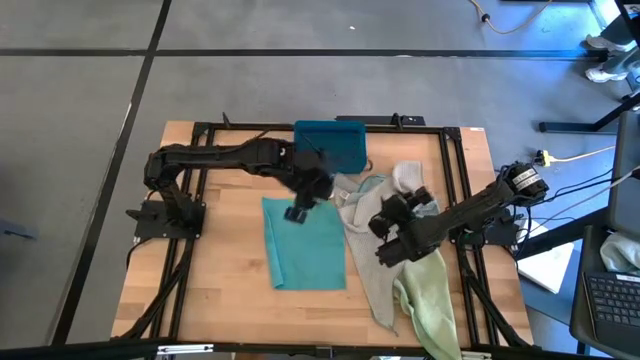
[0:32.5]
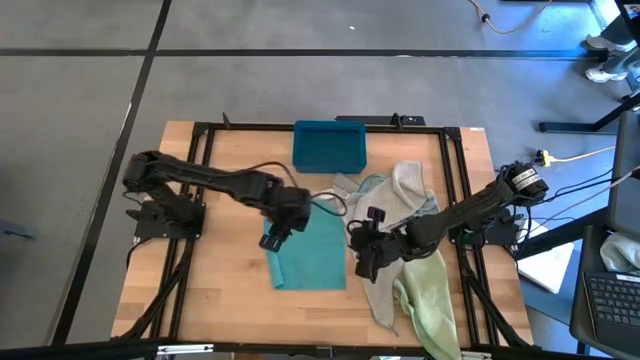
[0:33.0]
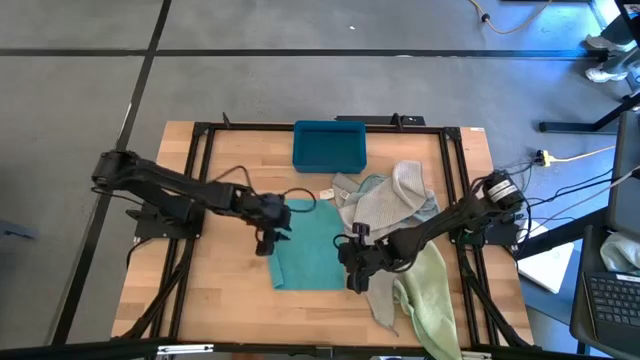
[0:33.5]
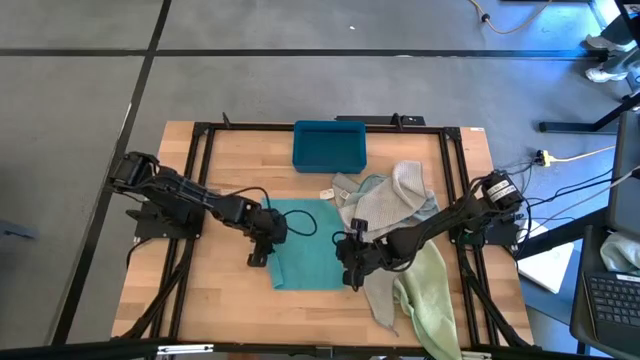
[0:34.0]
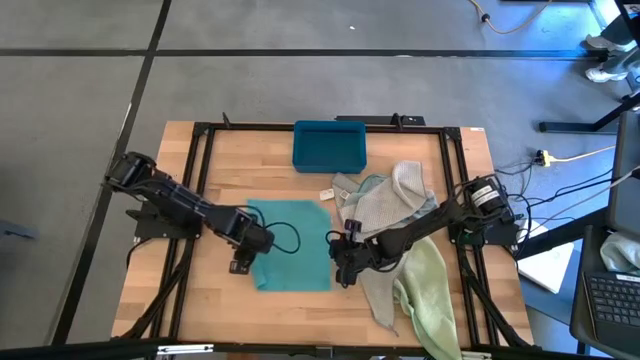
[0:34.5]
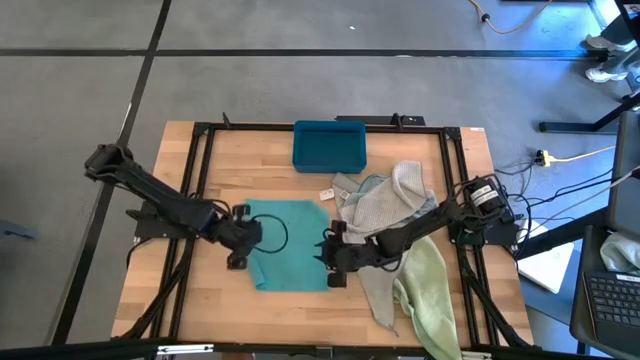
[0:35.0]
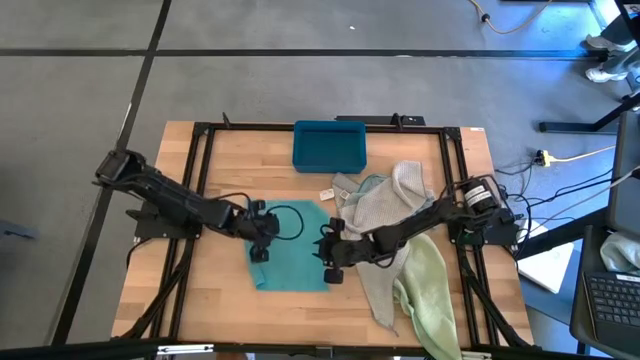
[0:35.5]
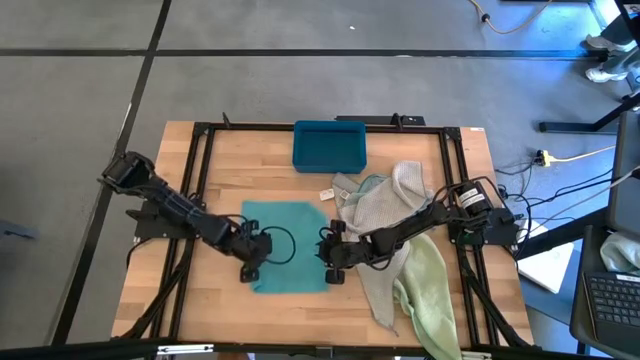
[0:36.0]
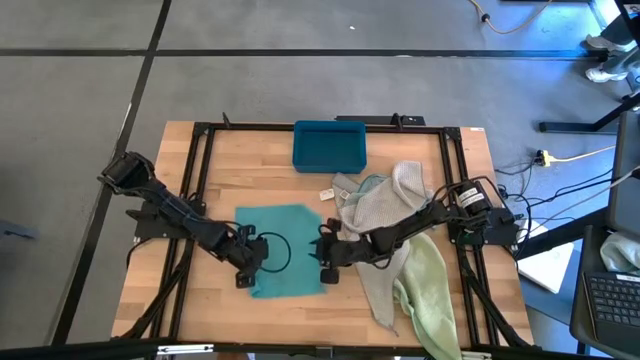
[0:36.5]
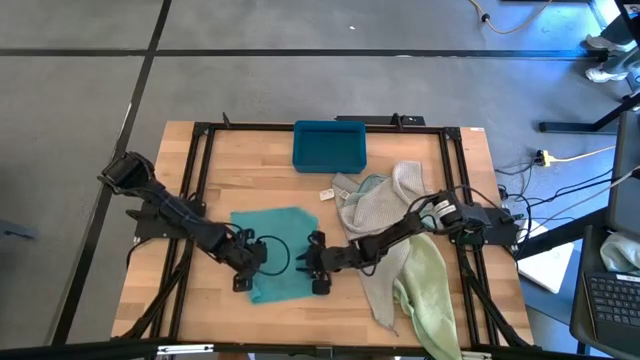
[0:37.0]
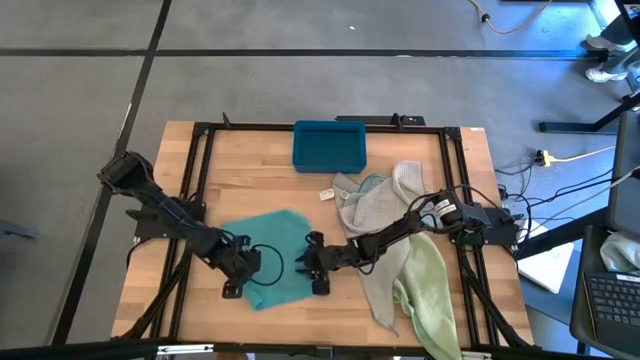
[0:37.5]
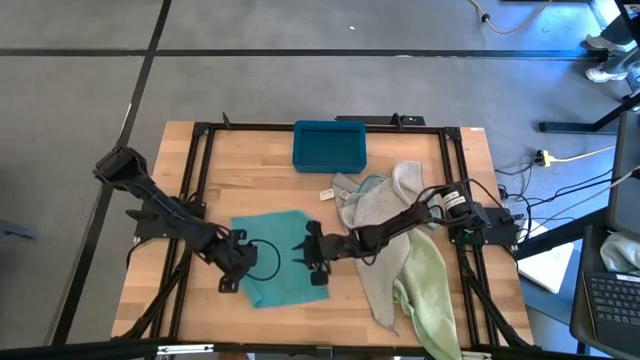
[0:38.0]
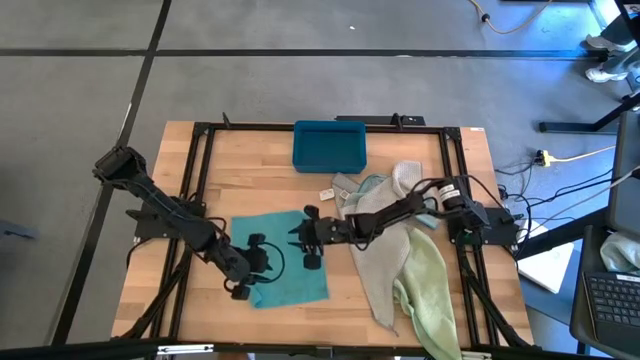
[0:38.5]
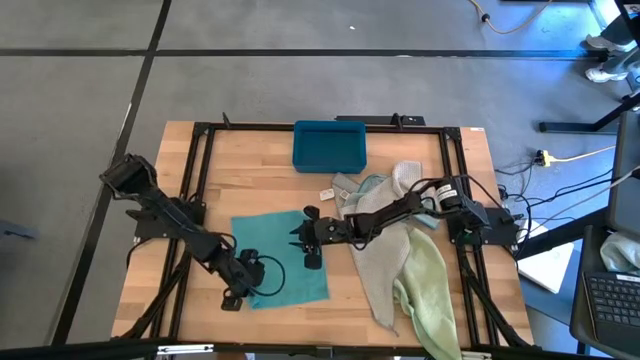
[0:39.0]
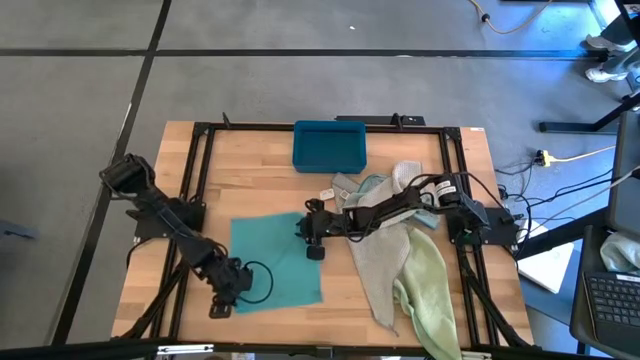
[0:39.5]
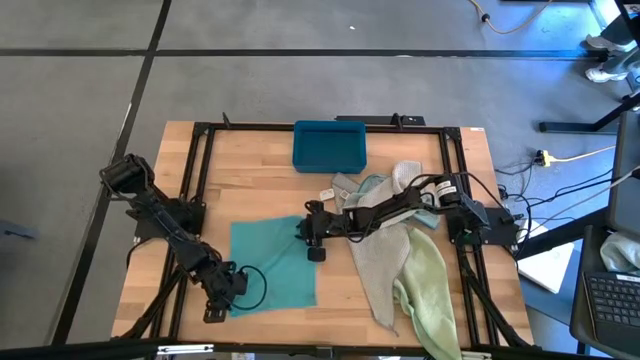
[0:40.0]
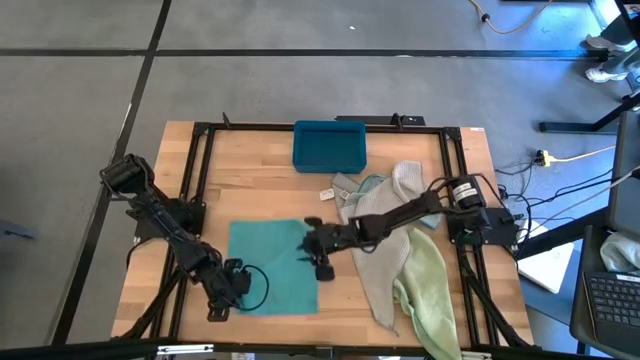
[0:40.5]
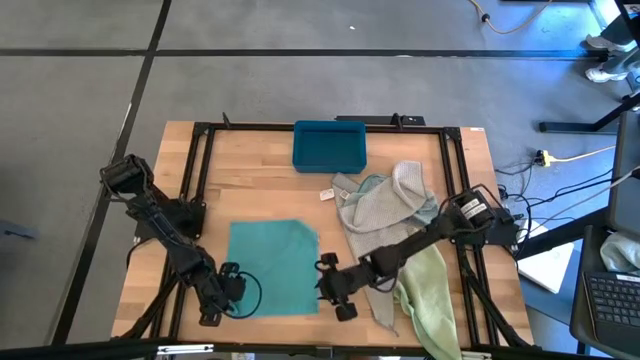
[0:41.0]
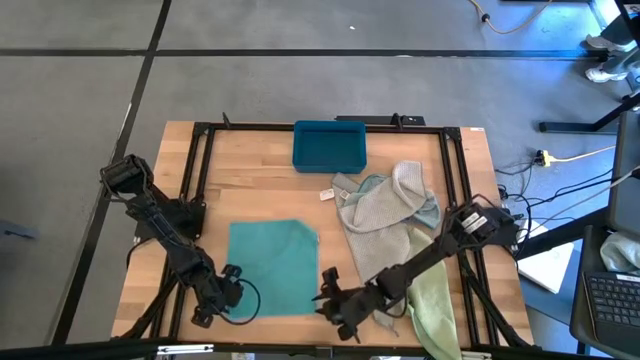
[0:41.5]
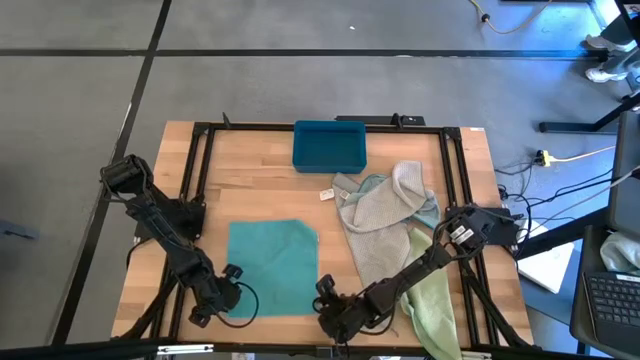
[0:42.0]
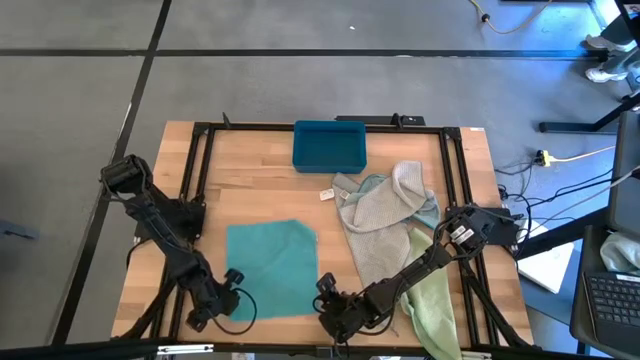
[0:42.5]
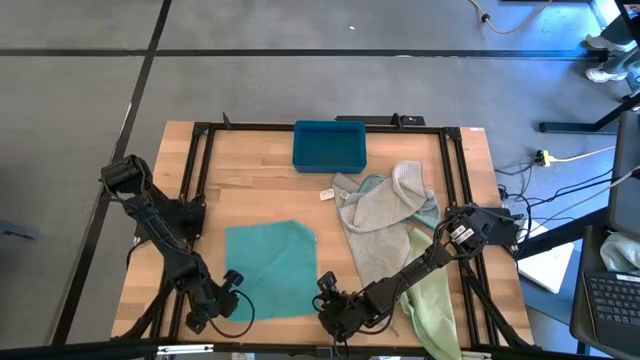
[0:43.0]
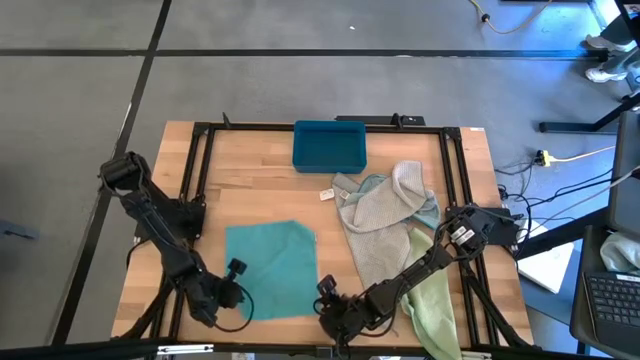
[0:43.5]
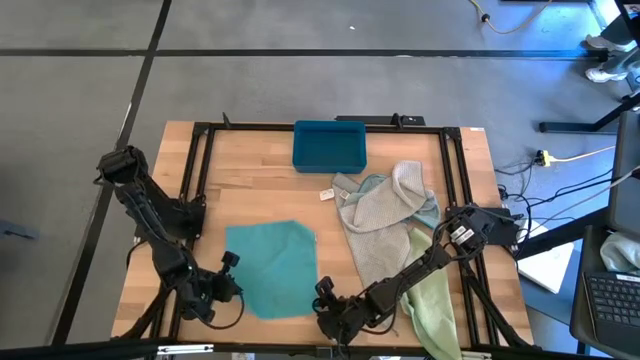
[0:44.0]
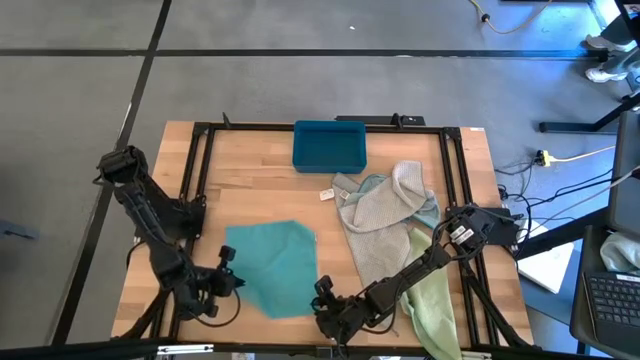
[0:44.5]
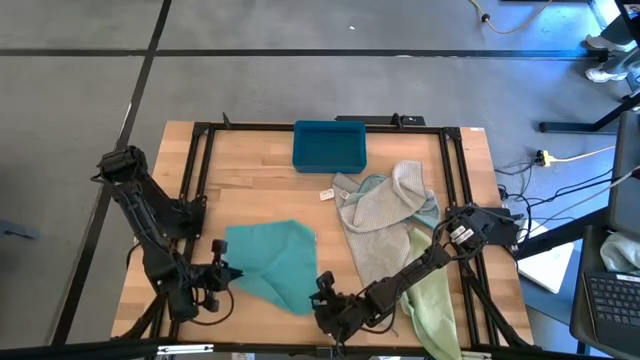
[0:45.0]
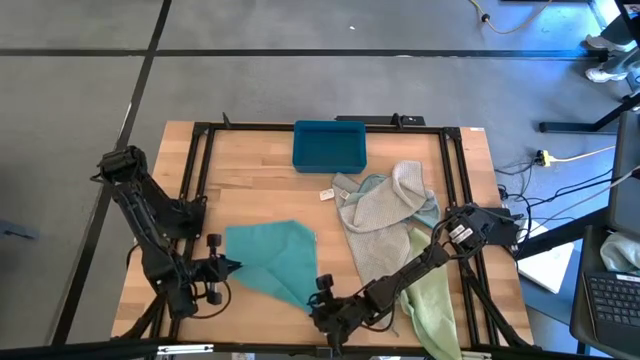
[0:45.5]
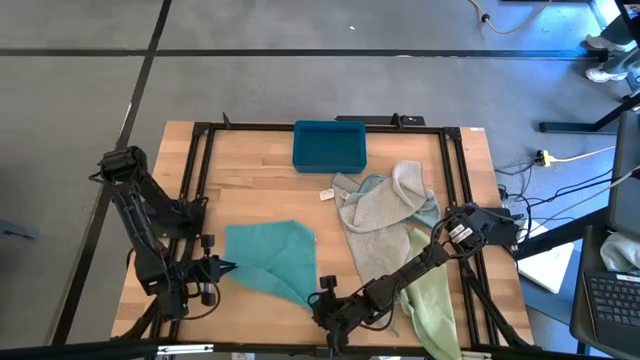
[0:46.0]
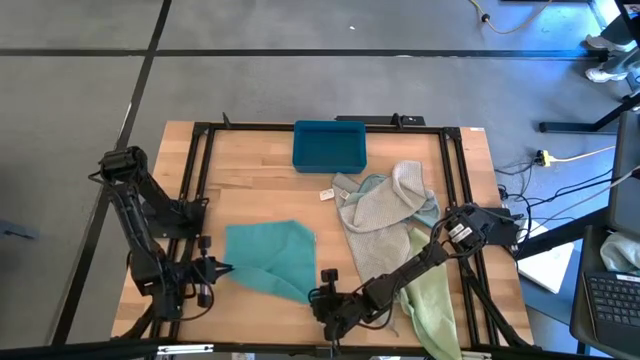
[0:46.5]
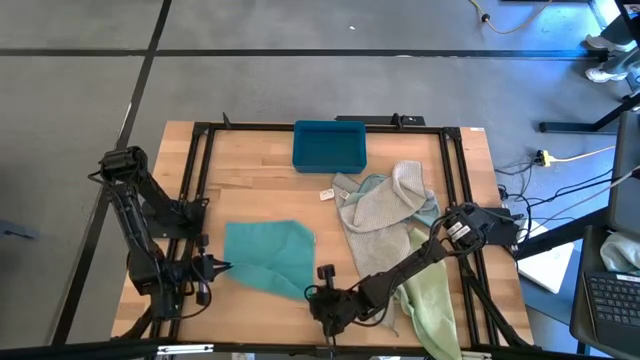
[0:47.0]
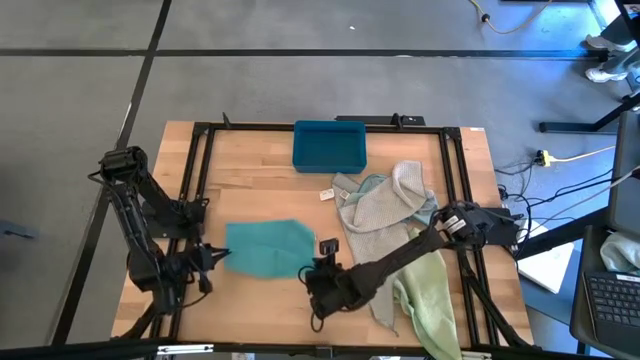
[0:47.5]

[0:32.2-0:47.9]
Task: Fold microfiber towels
Fold the blue towel

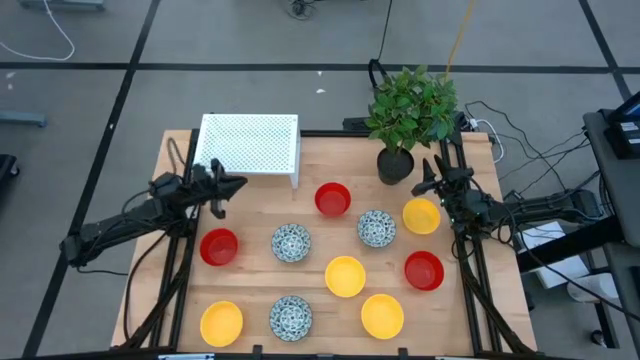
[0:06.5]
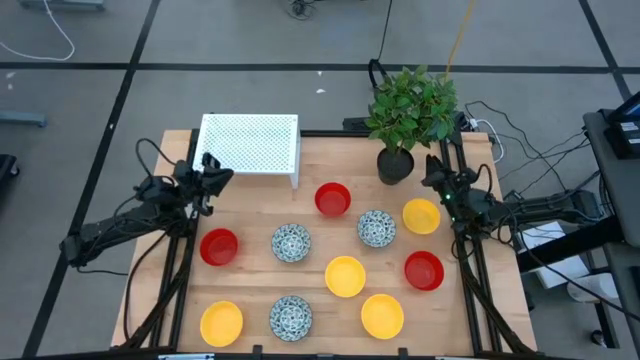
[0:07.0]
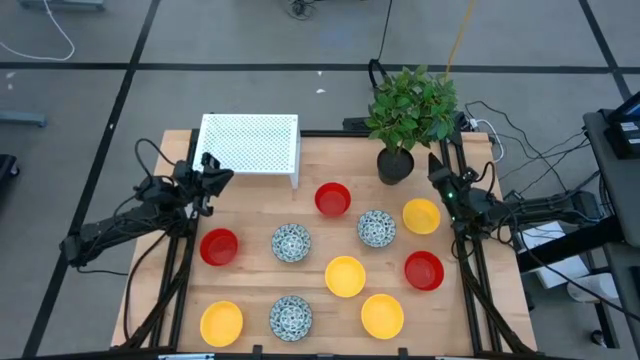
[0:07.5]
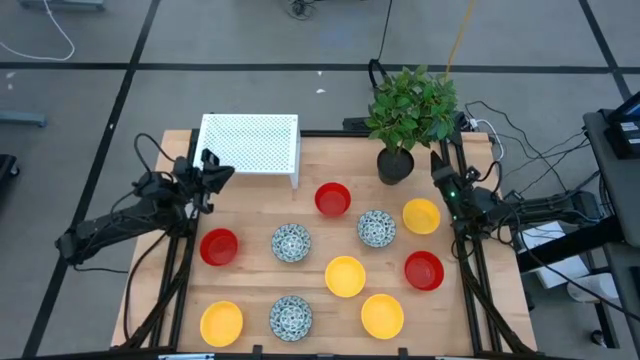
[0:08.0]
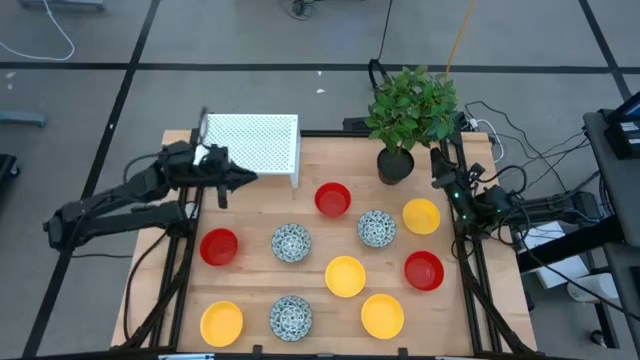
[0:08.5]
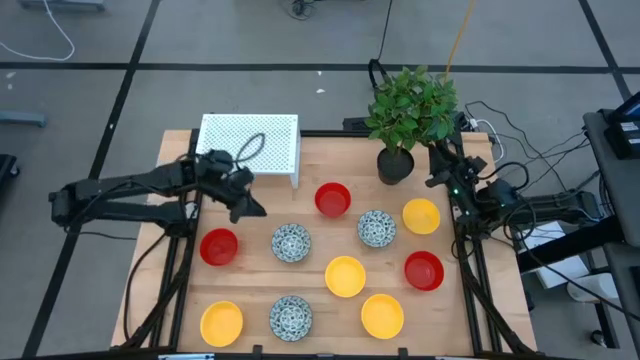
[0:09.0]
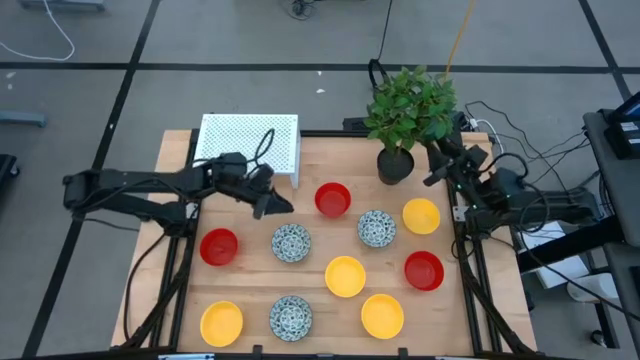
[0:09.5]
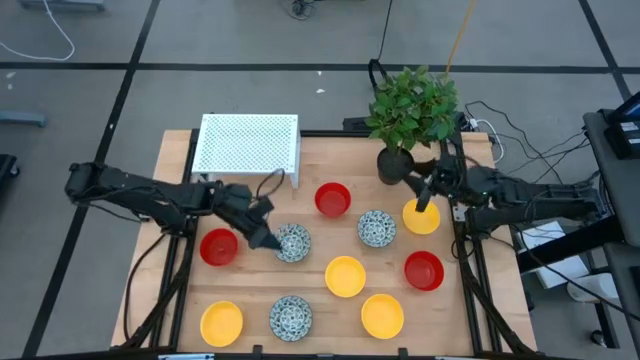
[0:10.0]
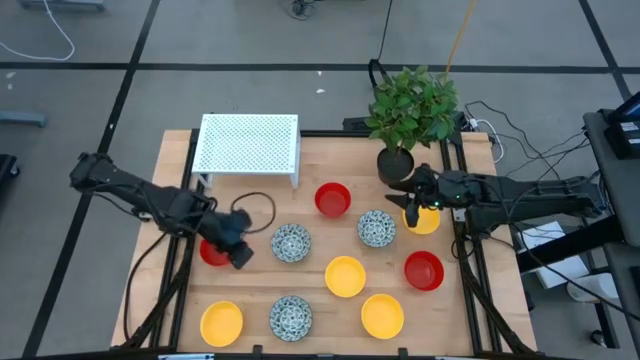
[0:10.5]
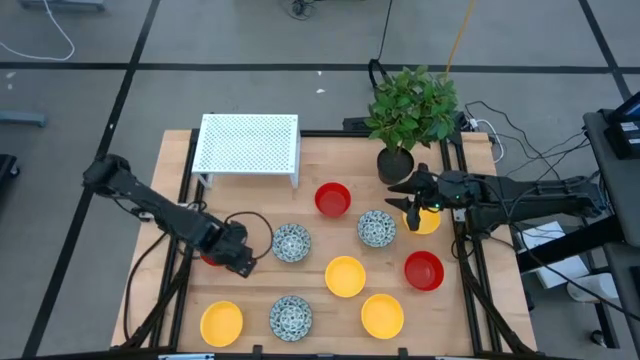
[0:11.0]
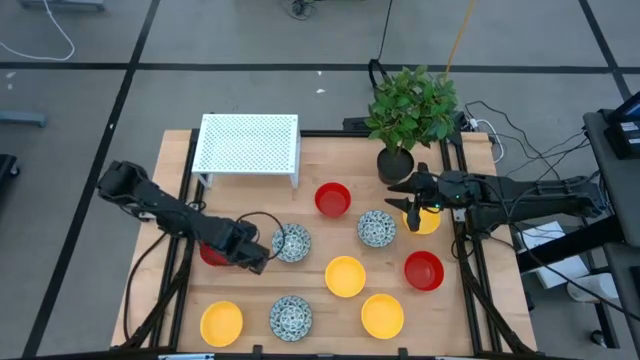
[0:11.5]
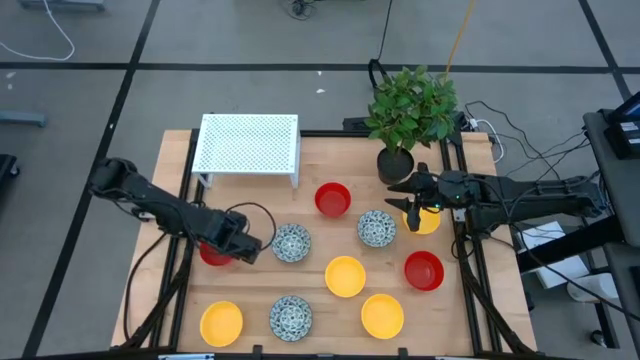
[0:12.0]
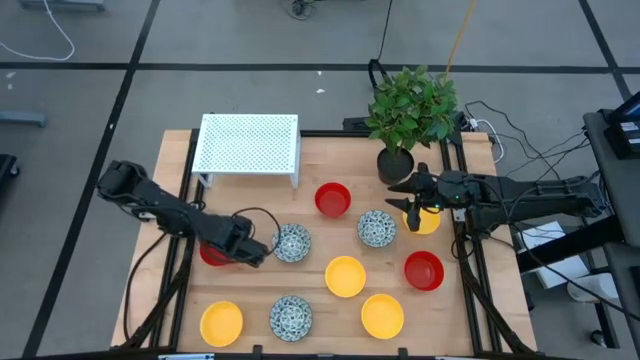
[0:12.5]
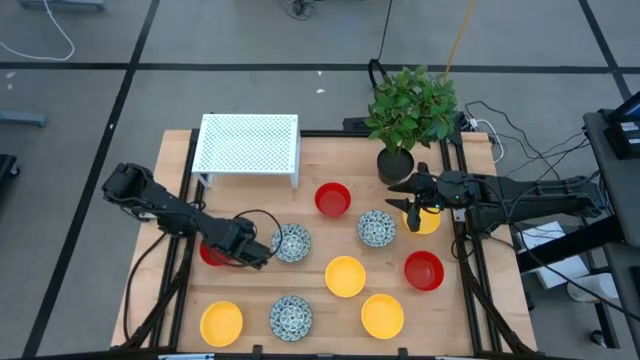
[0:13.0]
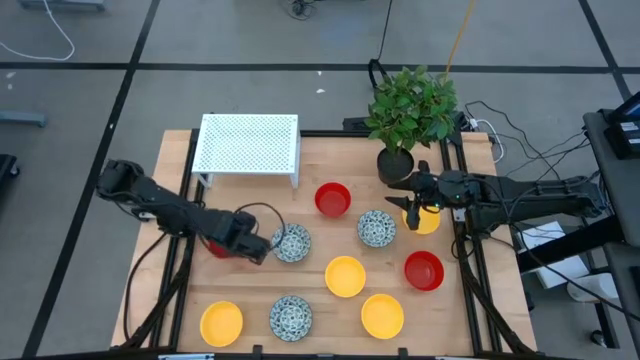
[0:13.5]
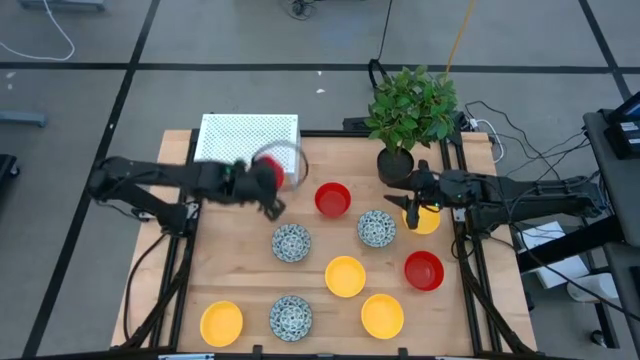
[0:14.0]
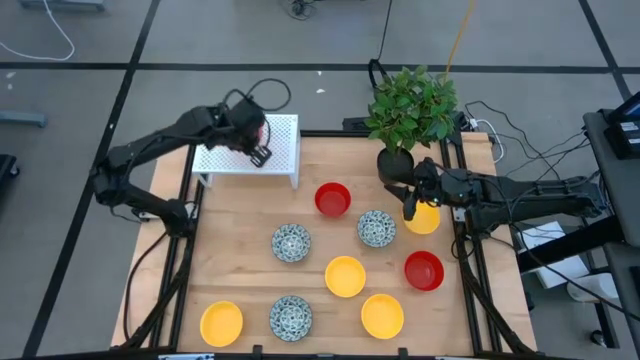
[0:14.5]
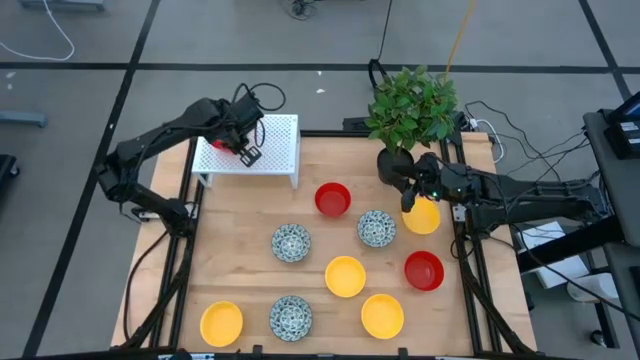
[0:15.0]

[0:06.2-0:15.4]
Task: Pick & Place Mini bowls
Put the red bowl on the shelf
